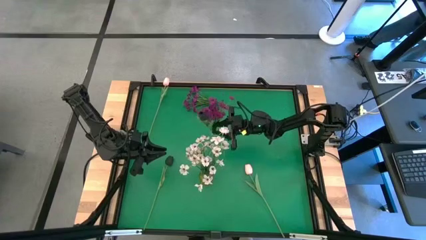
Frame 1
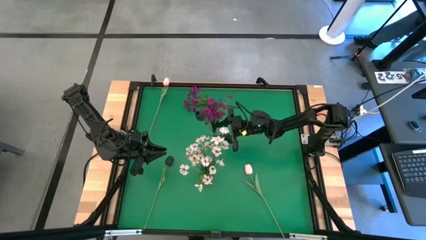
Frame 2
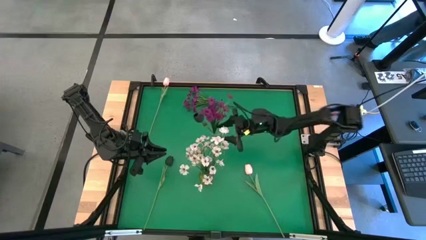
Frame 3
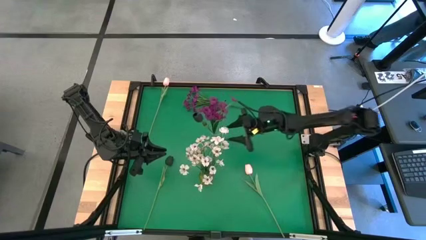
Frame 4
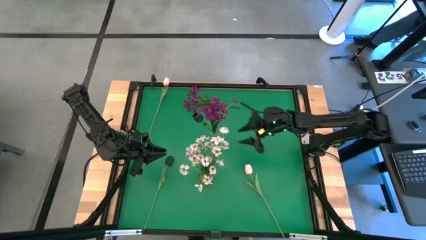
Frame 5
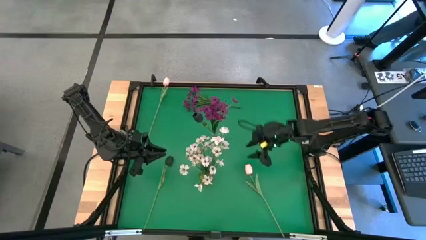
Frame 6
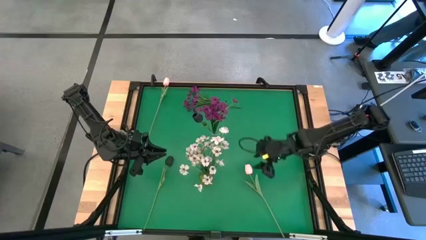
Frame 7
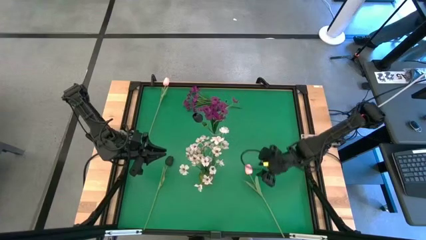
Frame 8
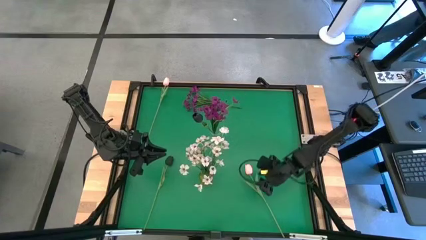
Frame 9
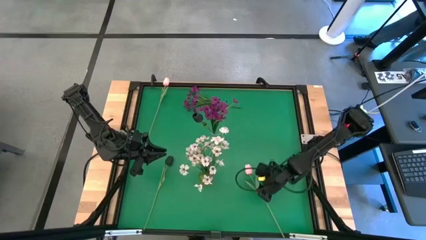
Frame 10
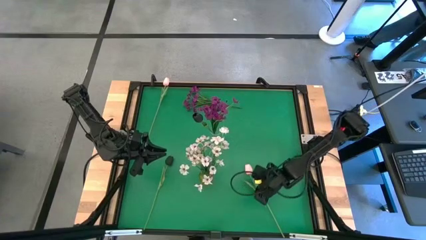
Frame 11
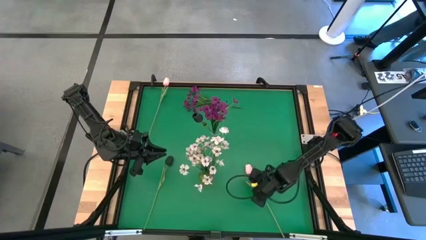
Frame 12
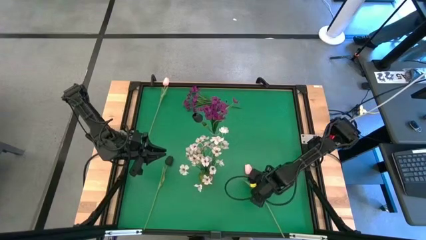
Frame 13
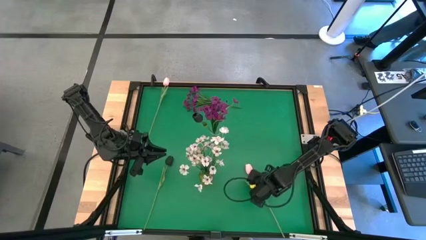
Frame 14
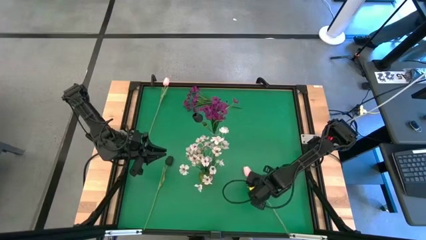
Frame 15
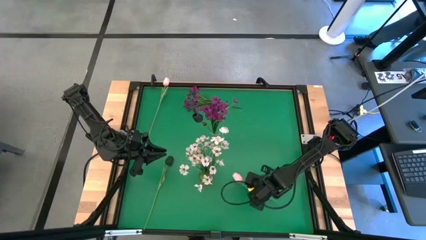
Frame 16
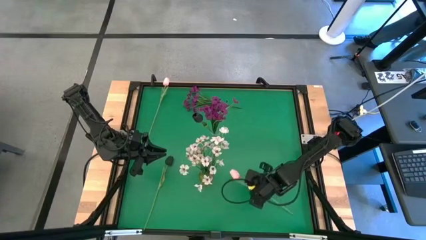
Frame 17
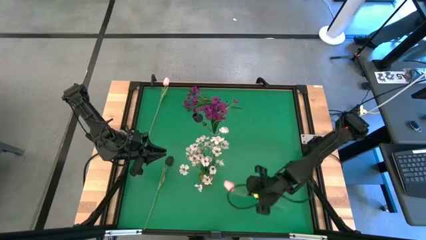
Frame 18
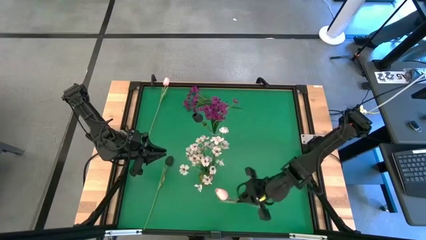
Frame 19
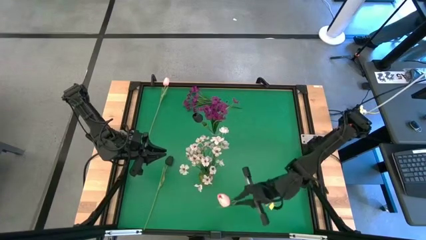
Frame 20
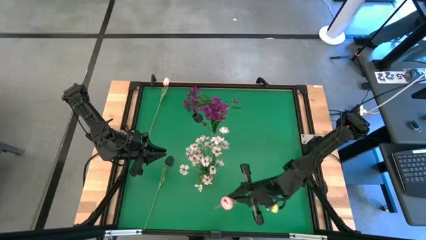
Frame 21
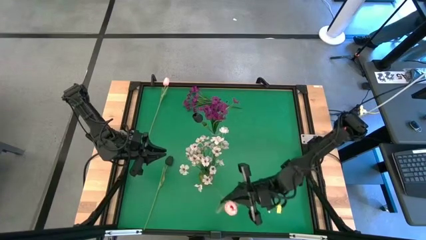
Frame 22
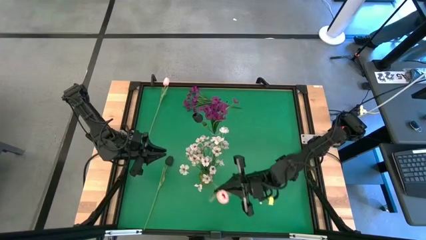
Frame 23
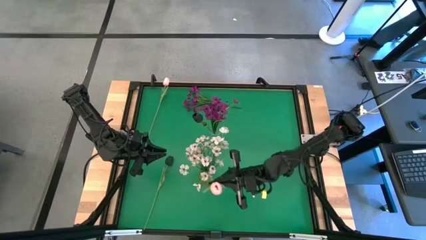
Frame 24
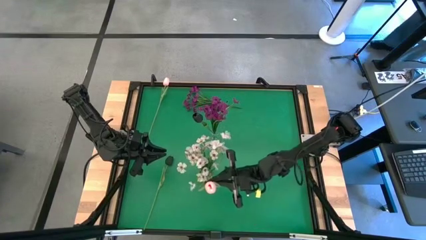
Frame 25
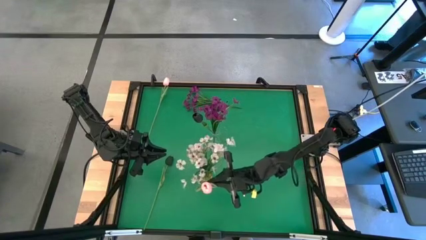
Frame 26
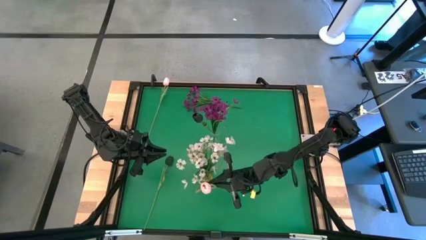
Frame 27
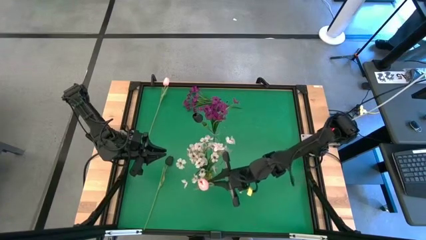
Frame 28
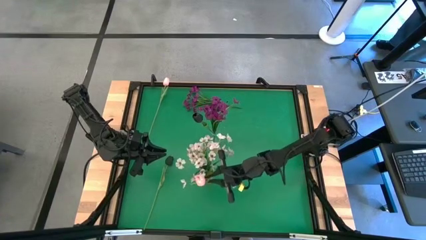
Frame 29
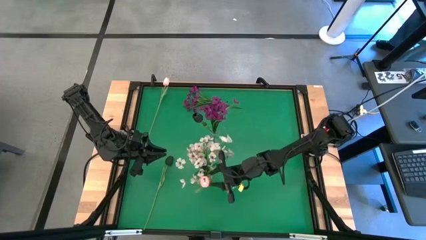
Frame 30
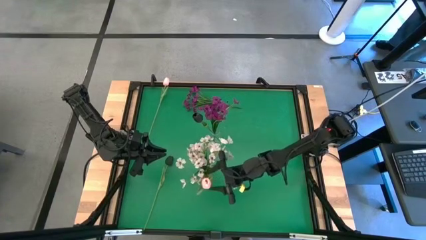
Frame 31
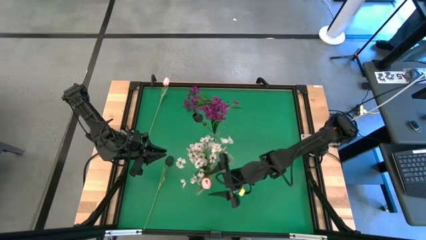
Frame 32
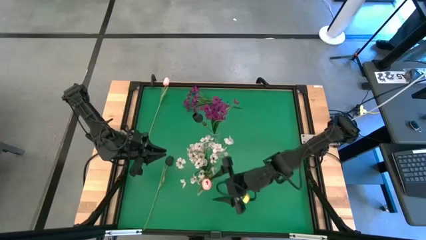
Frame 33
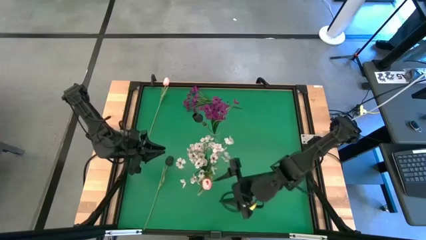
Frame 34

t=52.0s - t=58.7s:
Task: Sort flowers into vase by color
Put the bottom pink tulip into the yellow vase

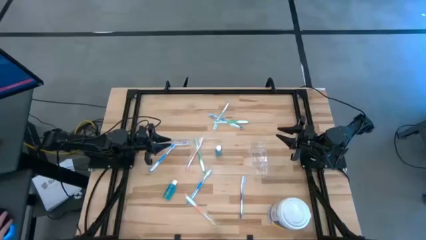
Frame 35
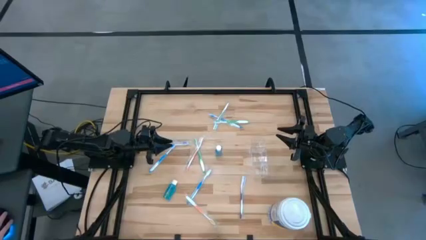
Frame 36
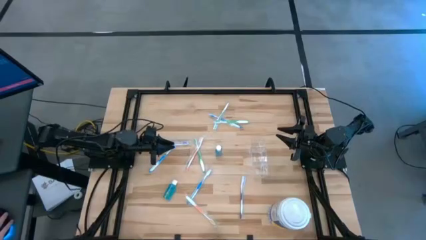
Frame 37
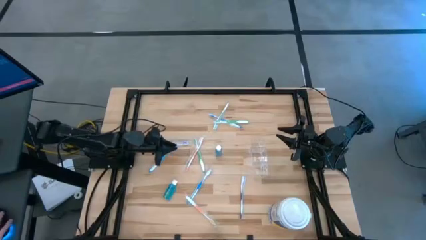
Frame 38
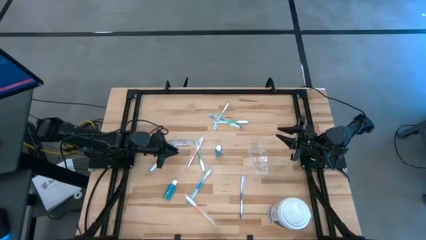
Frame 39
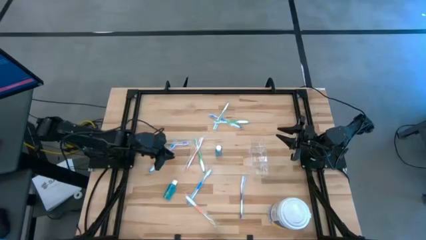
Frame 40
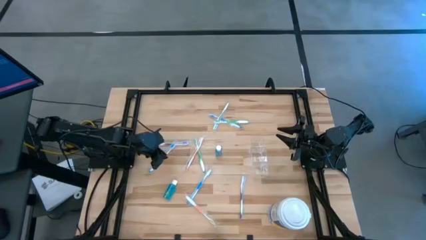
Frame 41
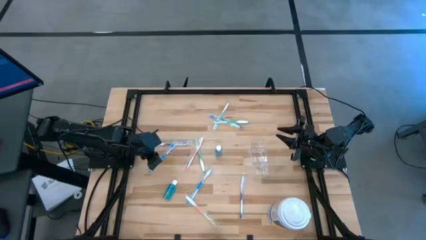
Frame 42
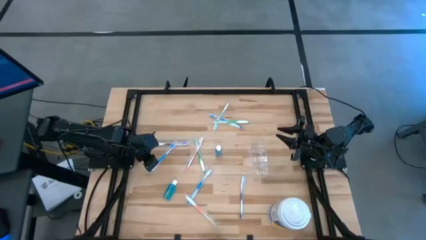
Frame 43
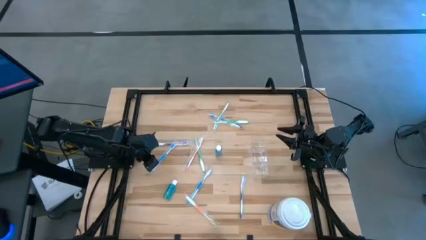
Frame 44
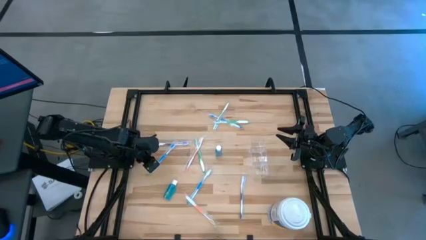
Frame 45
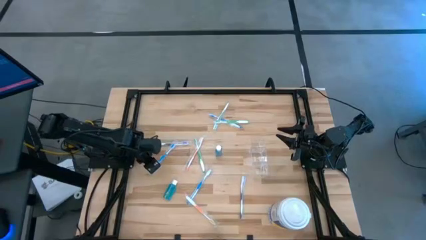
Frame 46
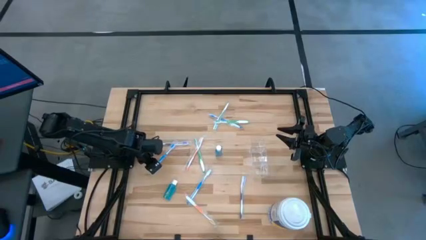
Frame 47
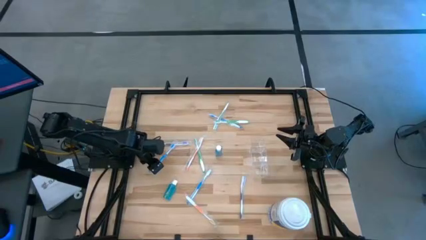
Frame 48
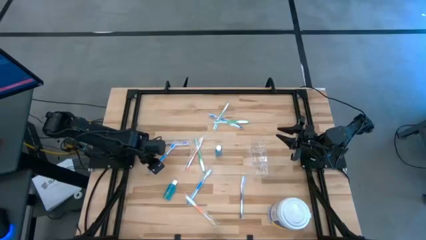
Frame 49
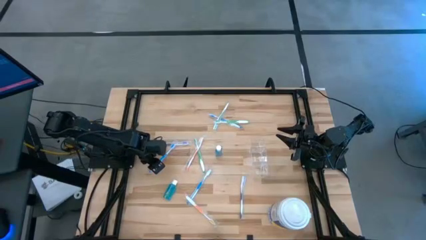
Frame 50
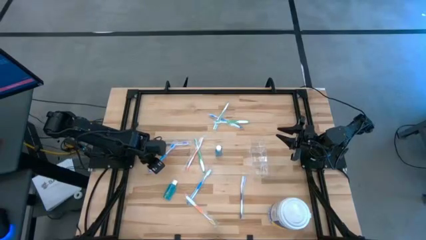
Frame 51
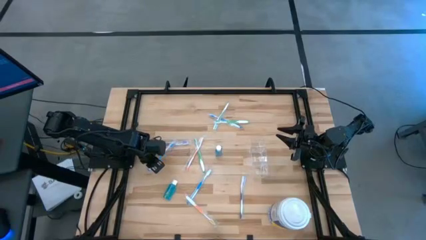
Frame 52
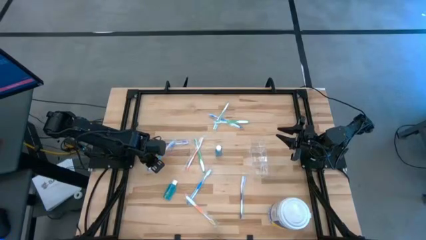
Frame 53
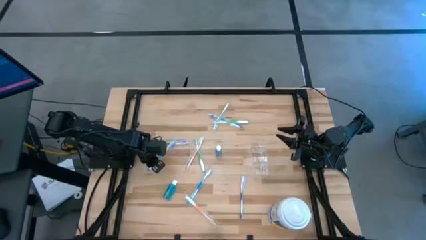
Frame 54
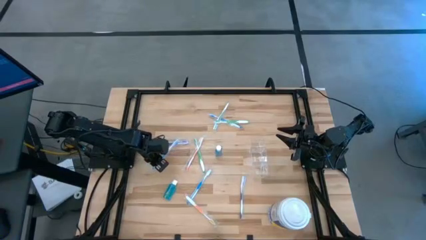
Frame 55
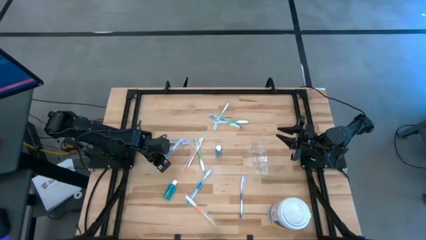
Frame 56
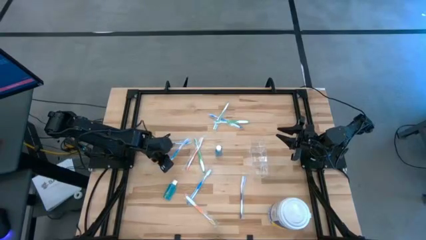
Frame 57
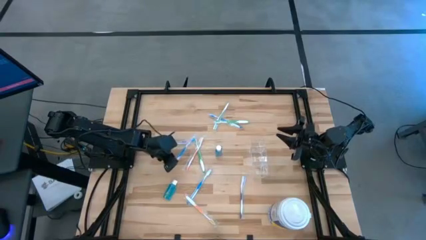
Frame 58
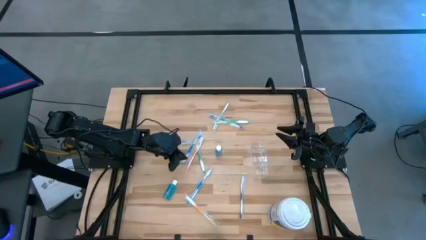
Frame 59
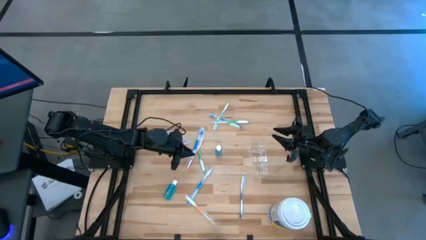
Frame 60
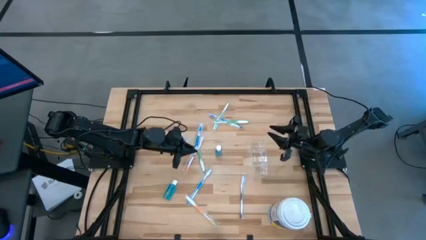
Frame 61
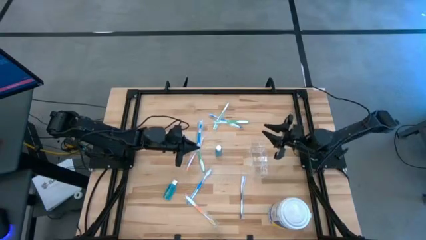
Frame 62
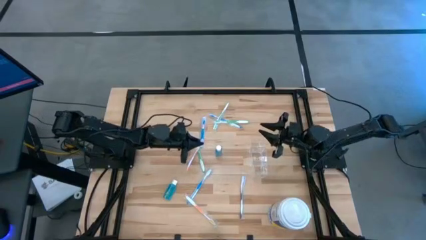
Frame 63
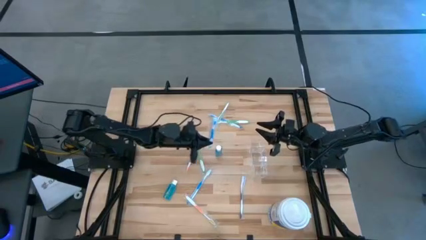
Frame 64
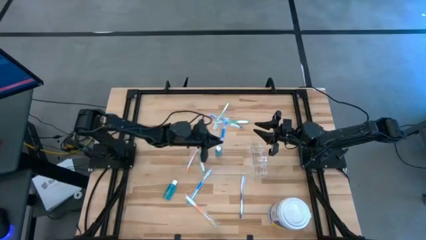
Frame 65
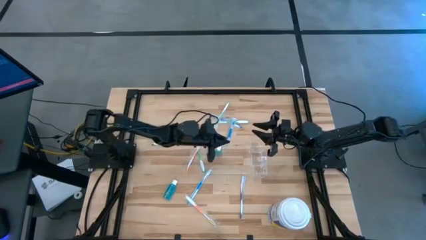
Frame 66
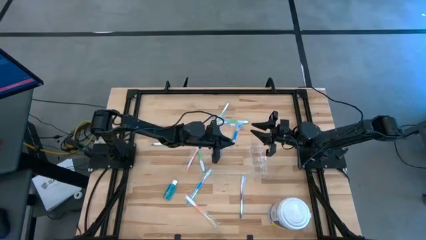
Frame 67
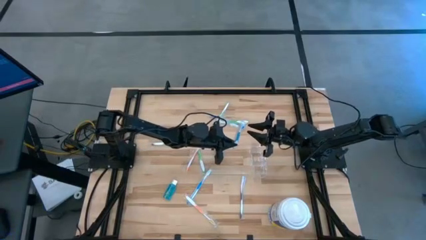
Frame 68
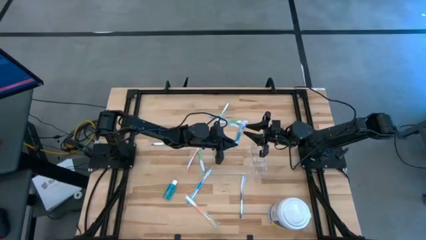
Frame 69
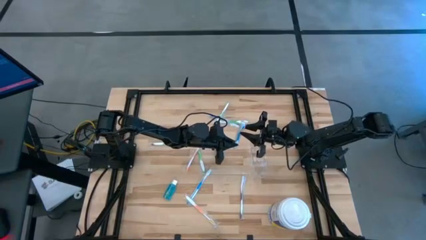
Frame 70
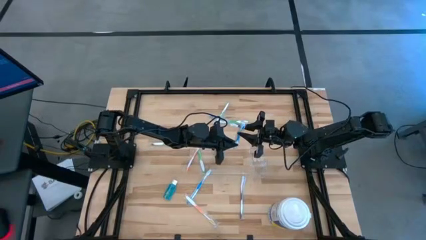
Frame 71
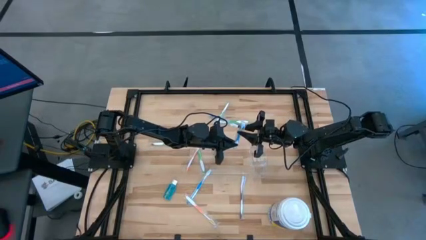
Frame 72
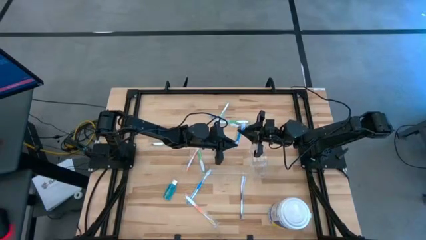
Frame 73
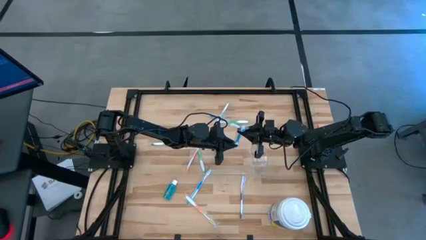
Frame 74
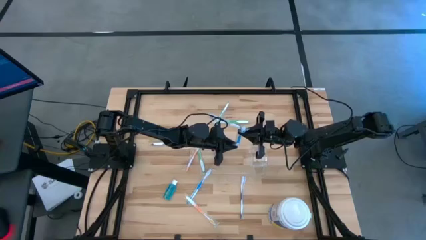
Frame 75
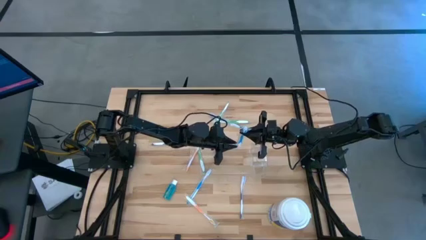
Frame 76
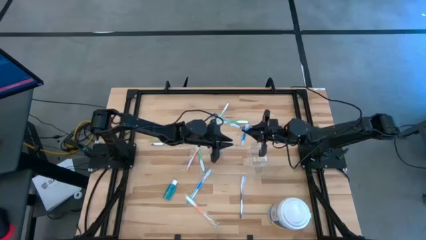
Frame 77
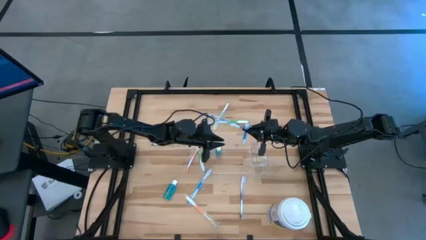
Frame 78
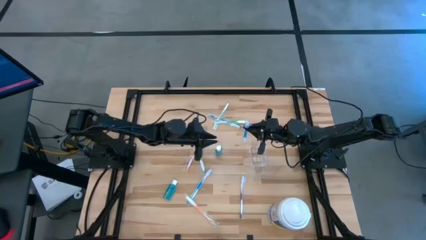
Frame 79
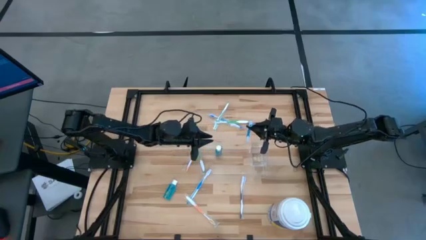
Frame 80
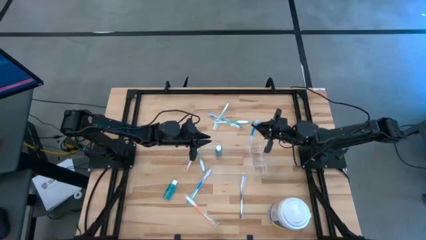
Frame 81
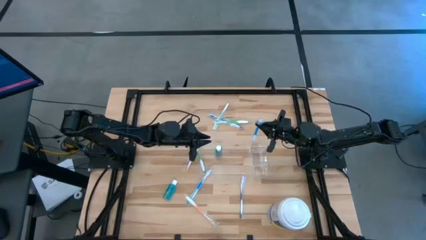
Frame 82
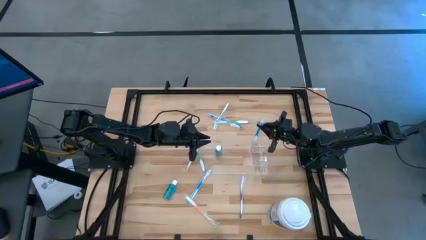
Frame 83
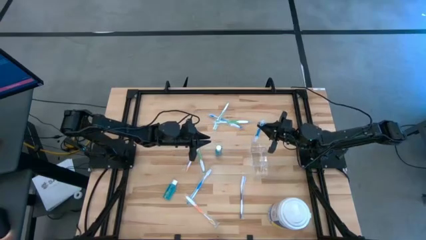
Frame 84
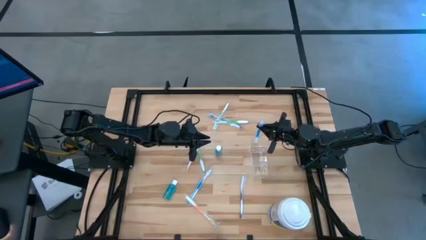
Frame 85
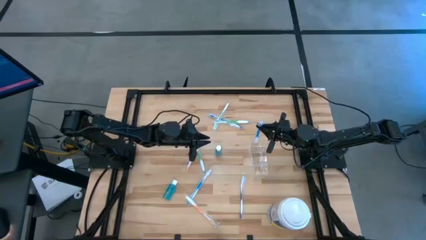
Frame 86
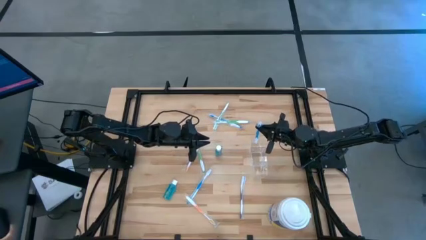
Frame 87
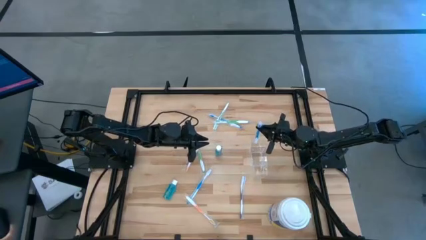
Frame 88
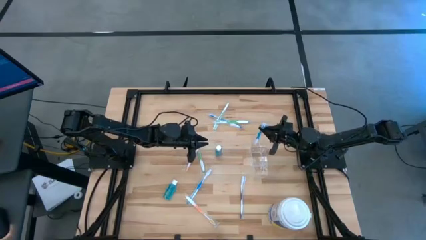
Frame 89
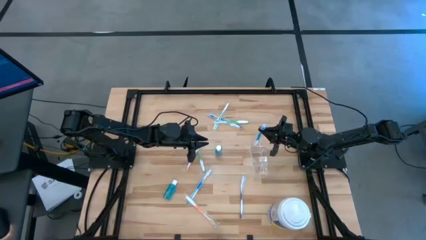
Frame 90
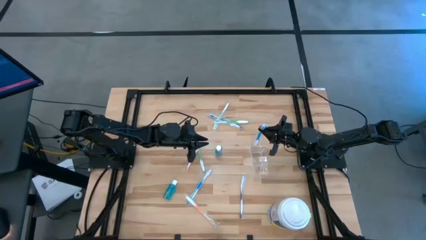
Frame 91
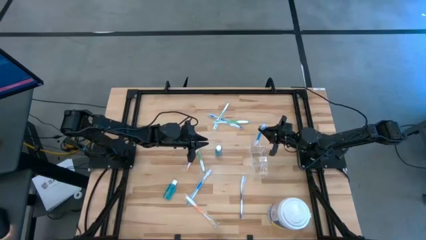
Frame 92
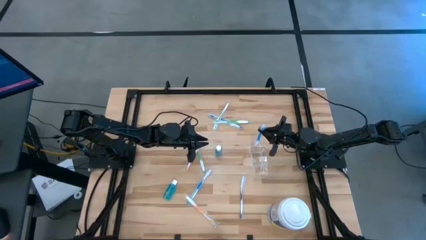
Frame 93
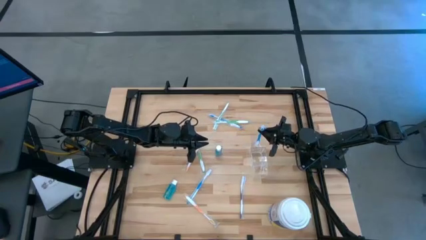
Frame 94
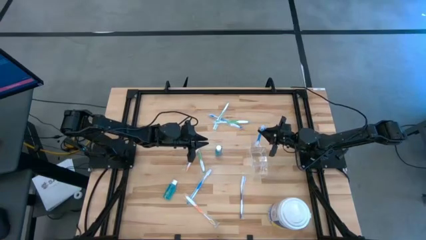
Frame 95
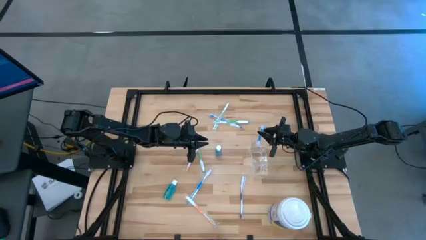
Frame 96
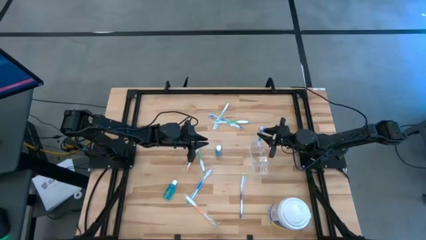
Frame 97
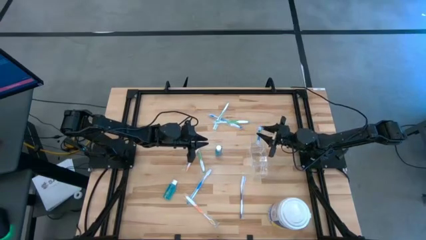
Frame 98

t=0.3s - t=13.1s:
Task: Pick & Place toothbrushing station
Put the middle blue toothbrush into the transparent organizer
